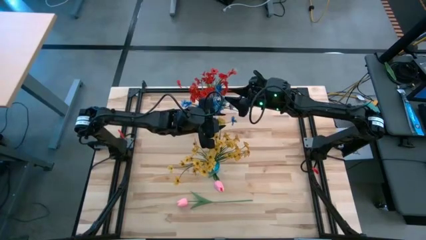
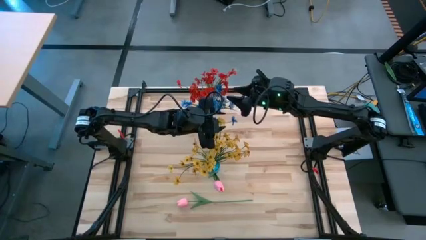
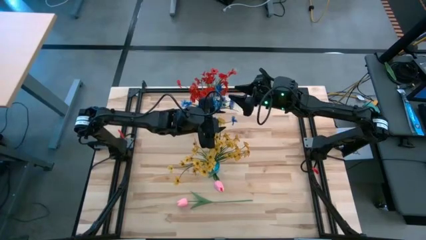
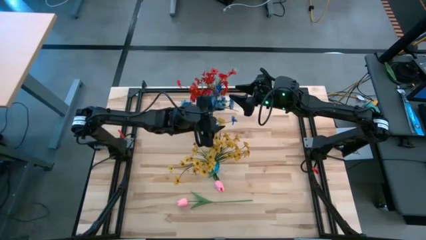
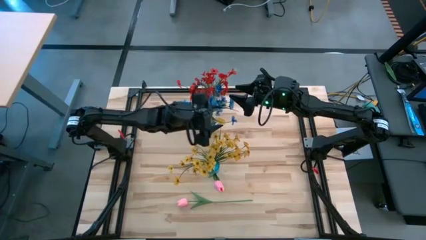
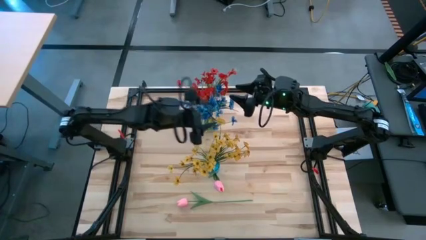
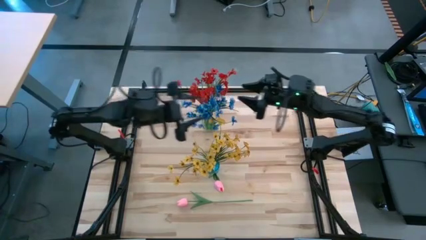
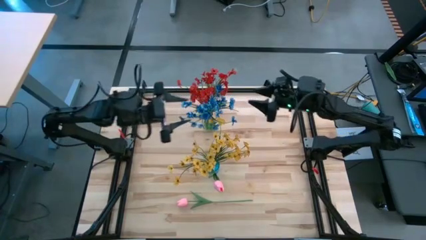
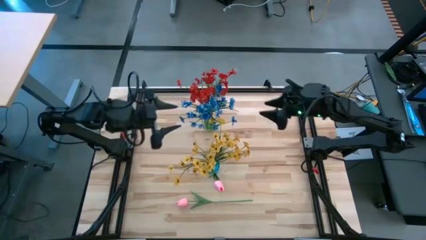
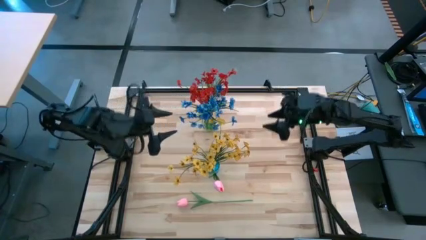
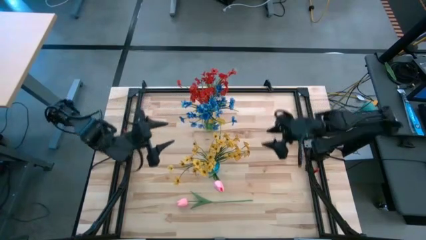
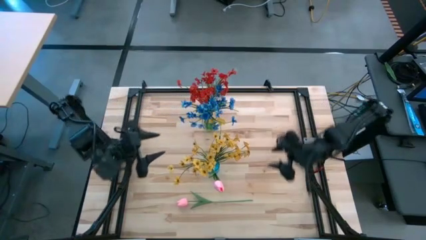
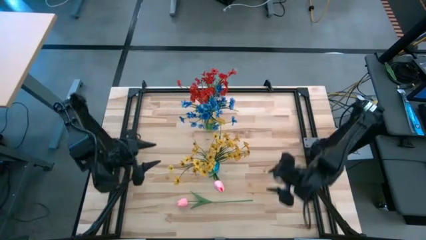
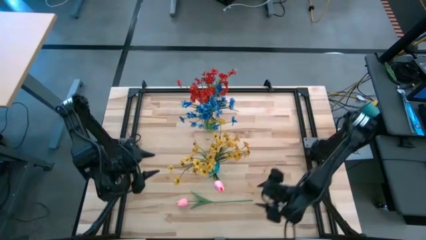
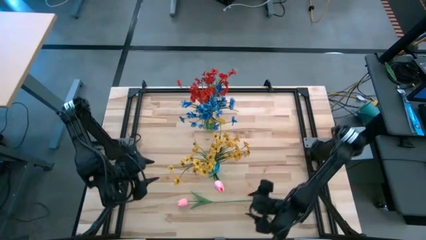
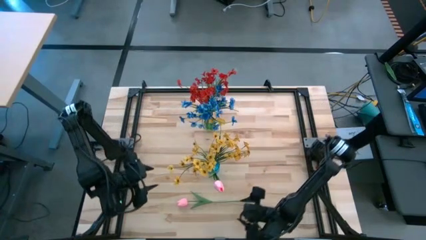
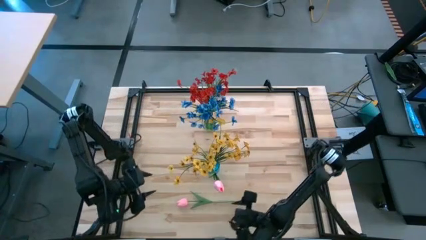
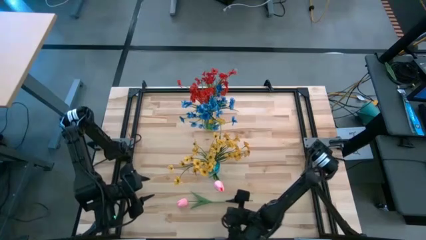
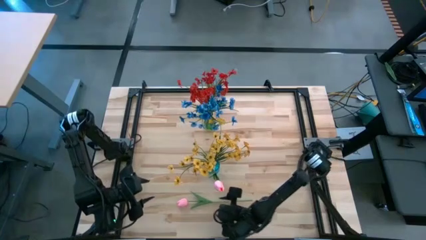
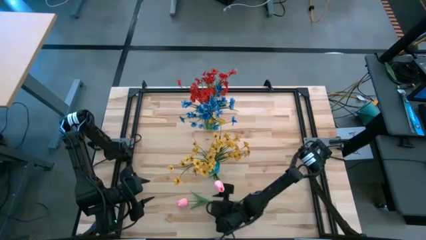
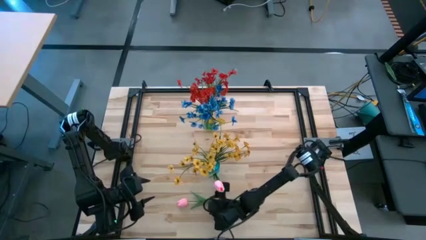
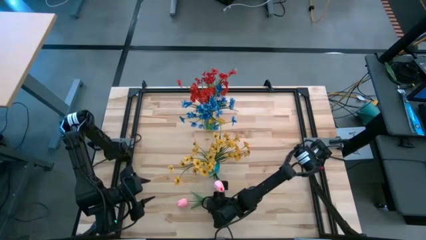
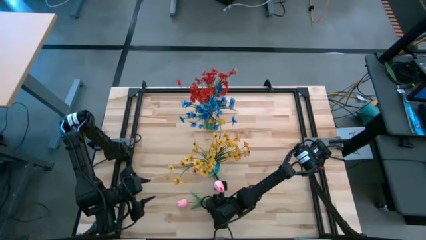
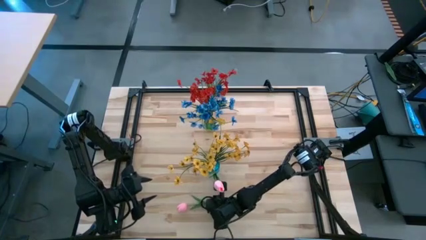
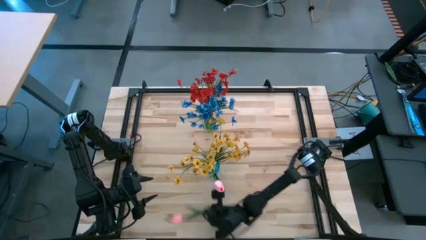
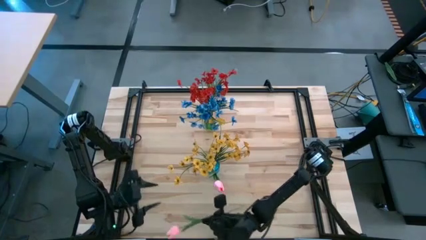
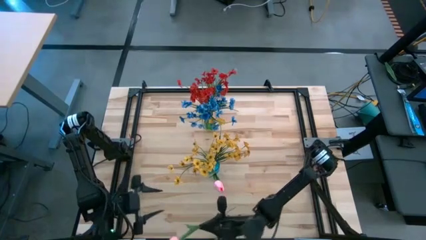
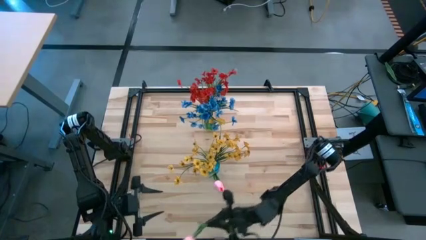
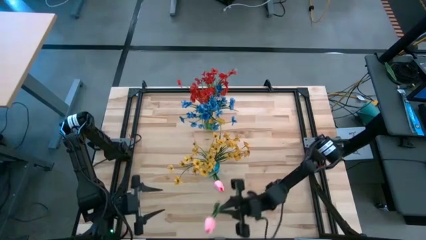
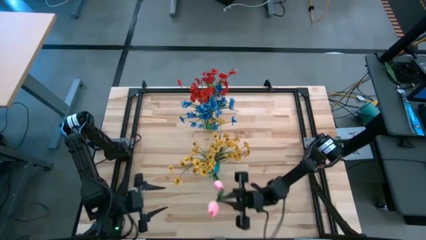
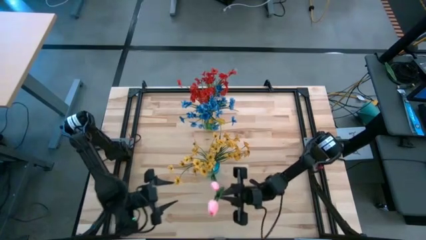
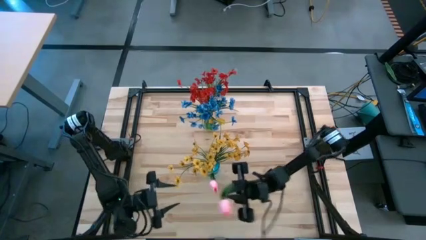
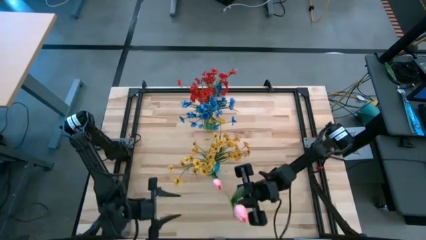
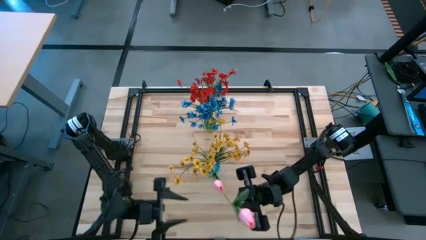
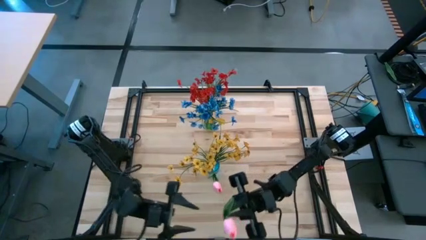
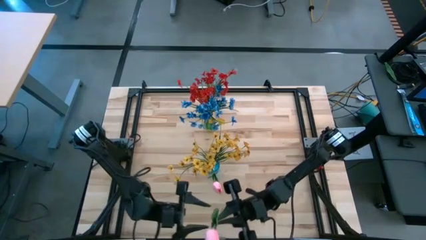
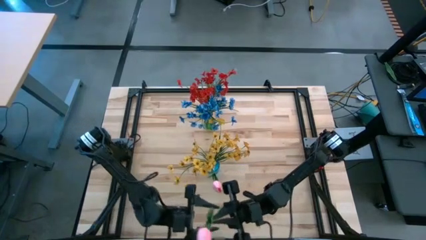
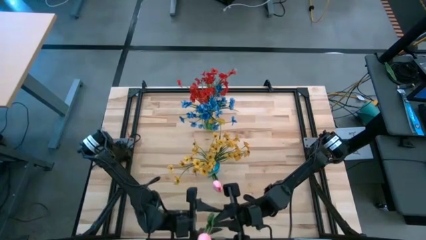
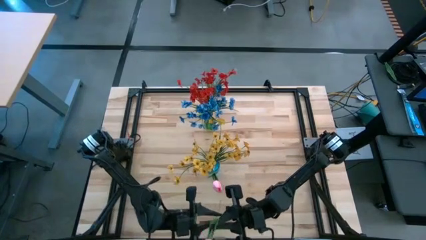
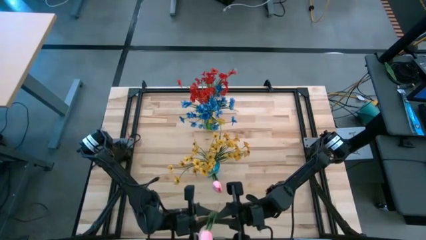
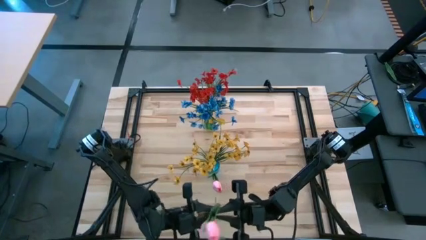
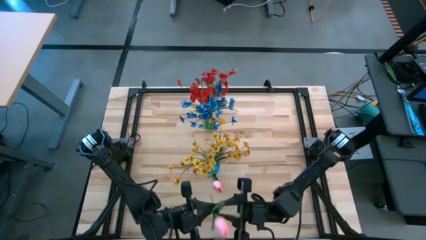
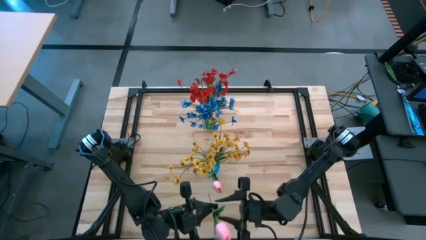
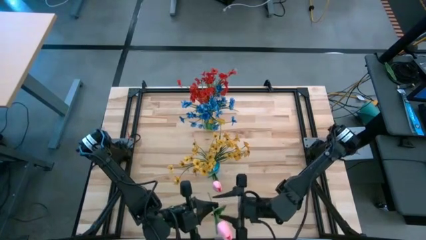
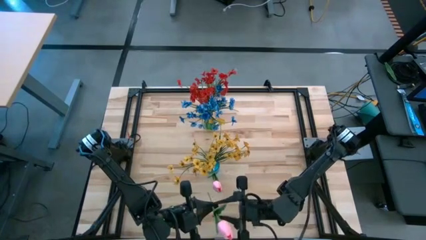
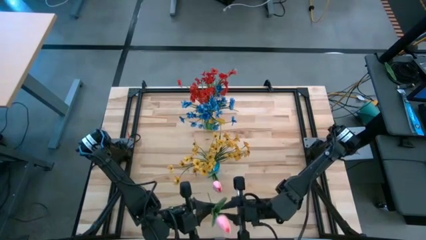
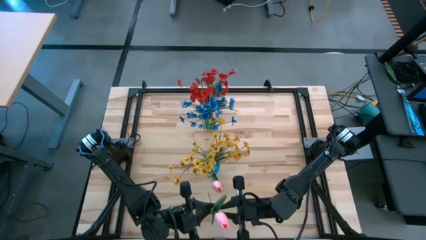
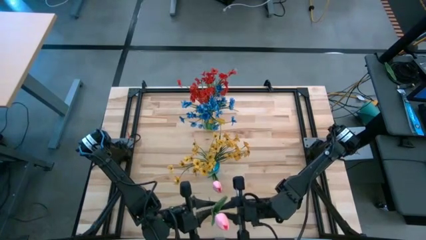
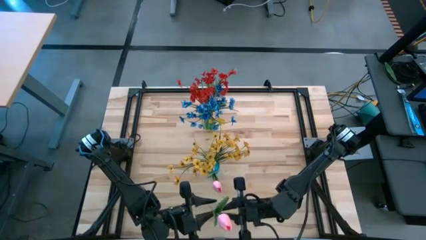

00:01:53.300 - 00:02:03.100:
Task: Sort flowers into vase by color
Put the pink flower into the blue vase

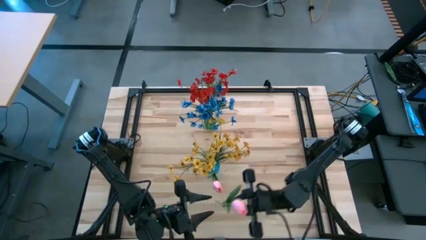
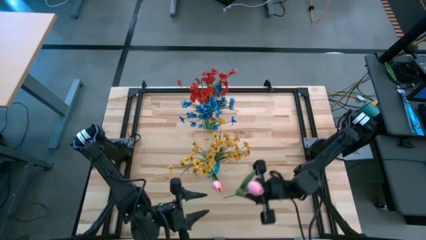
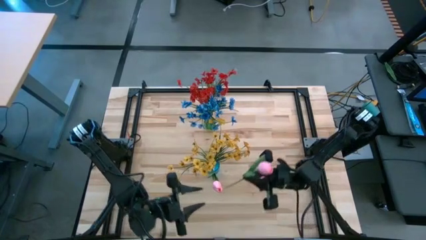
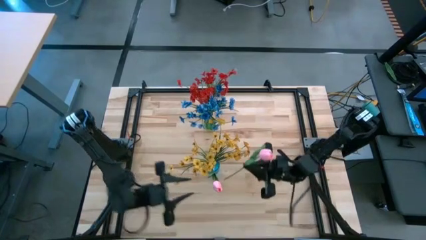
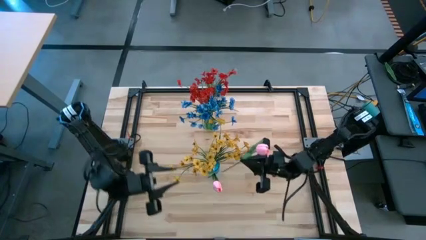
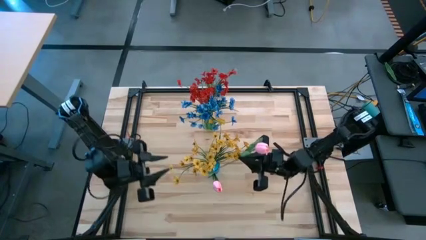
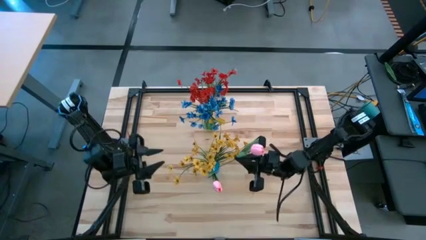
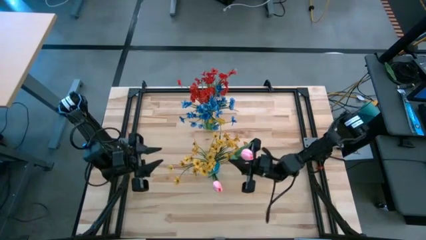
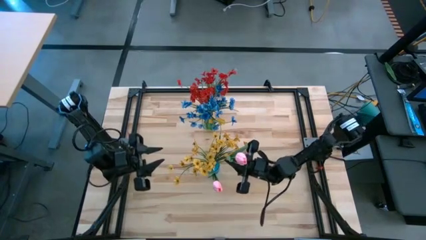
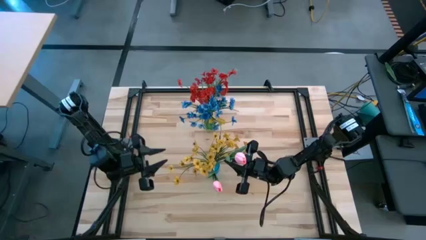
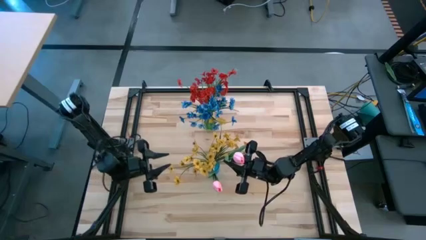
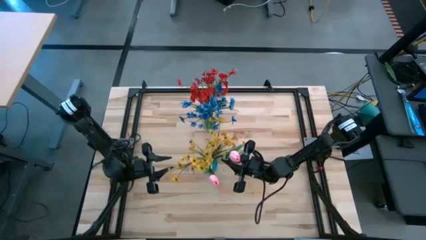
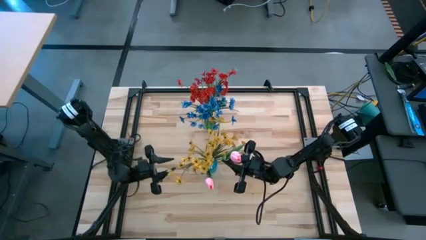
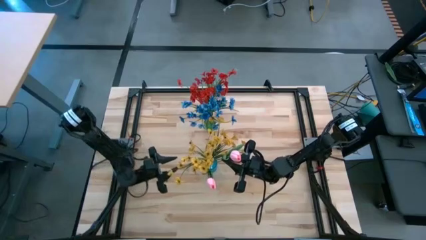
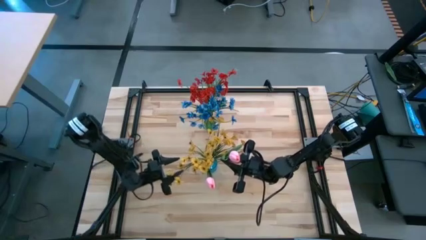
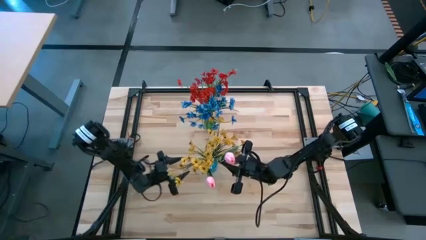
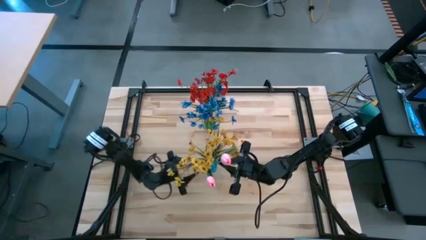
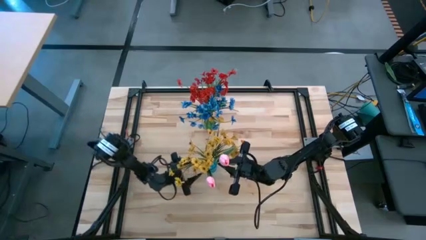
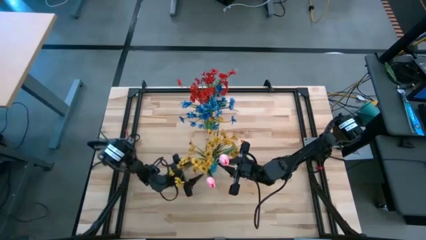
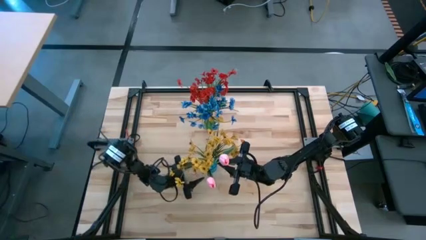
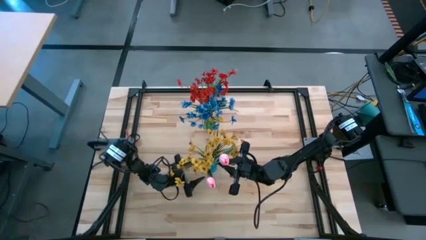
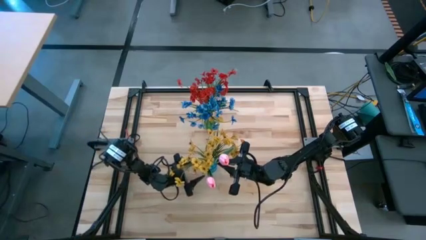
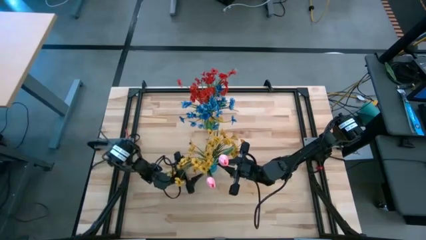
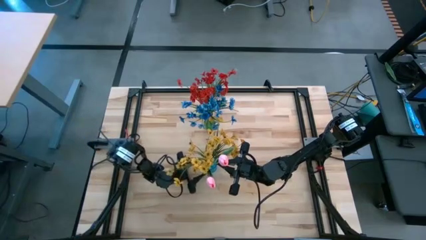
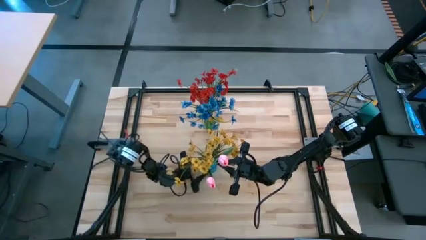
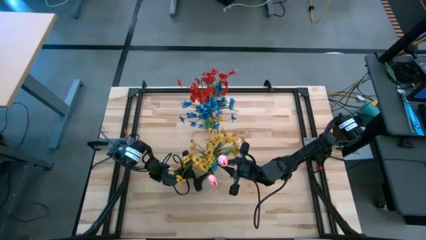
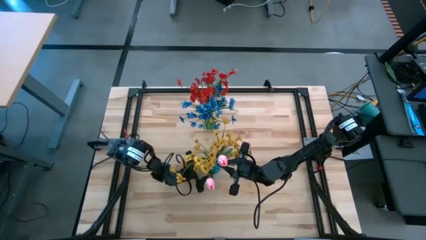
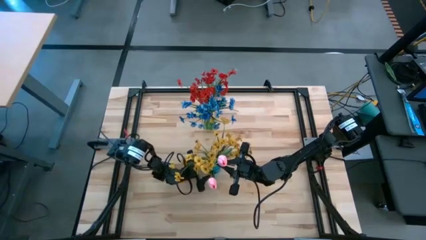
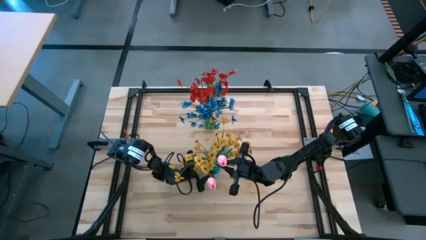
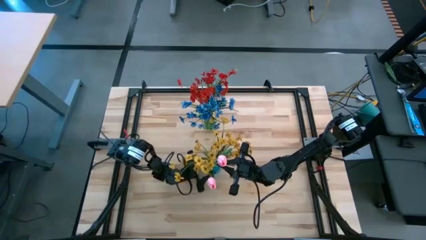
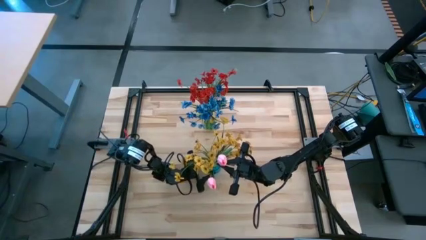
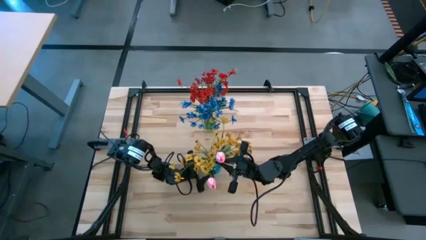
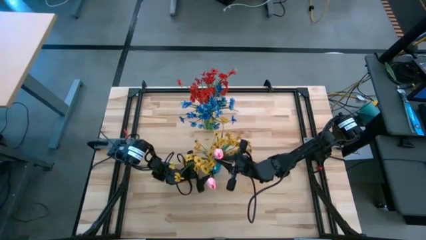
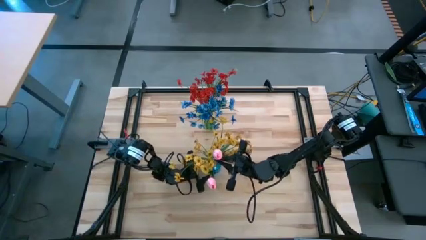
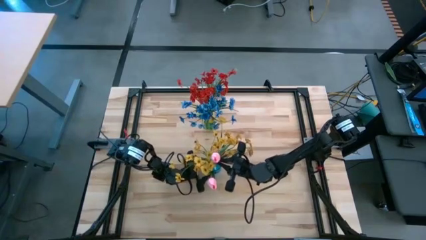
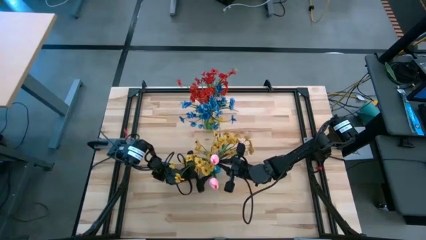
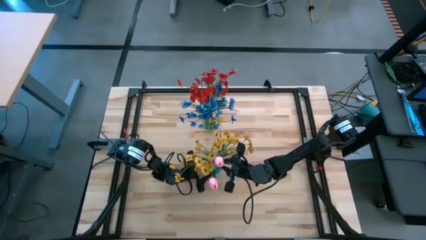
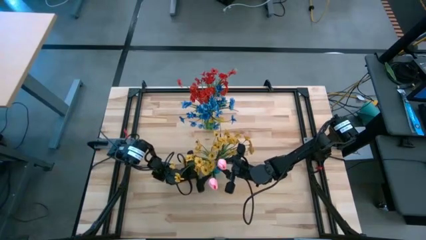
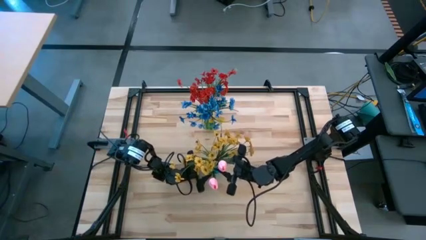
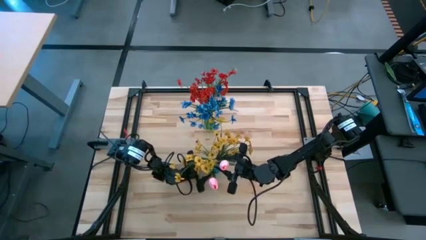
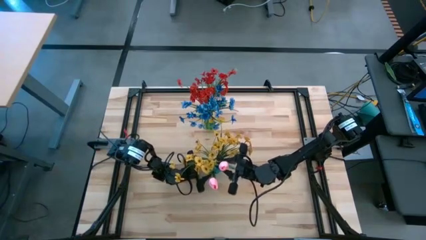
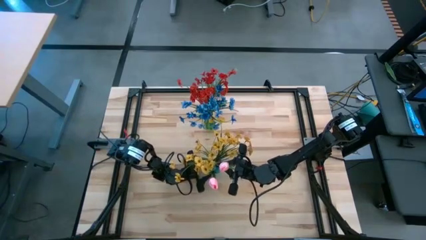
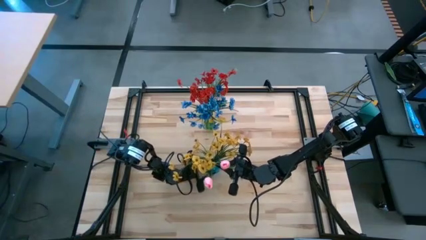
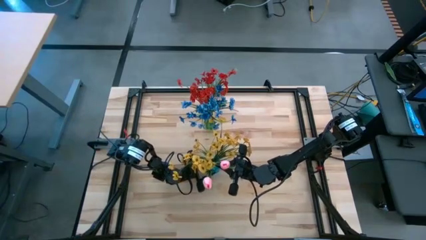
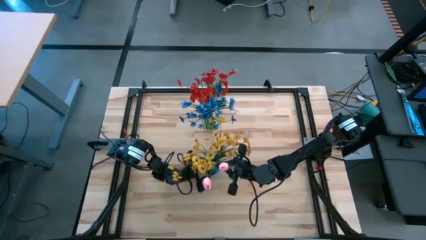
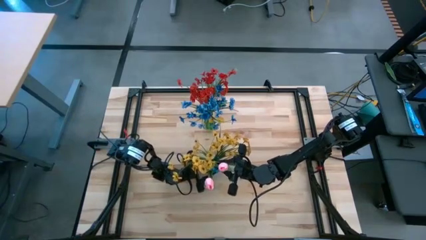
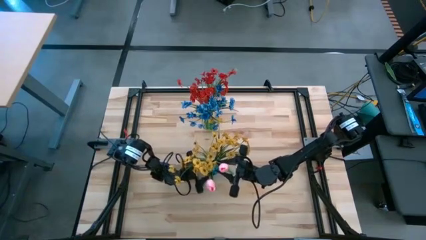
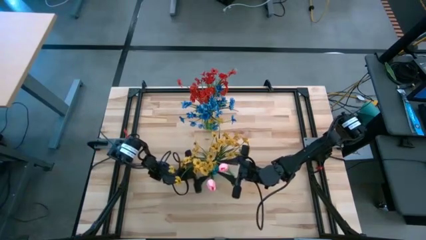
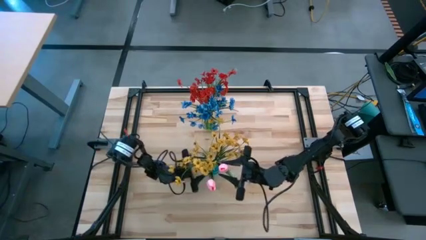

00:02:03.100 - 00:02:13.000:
Put the pink flower into the blue vase
